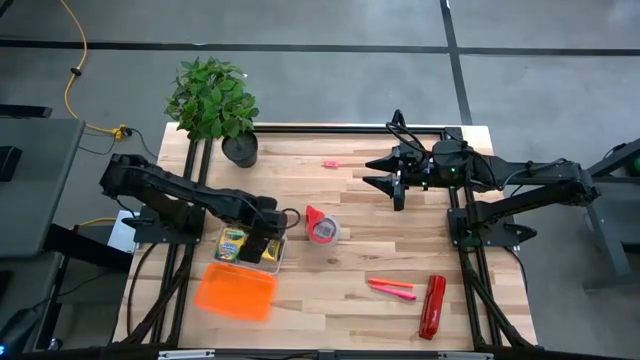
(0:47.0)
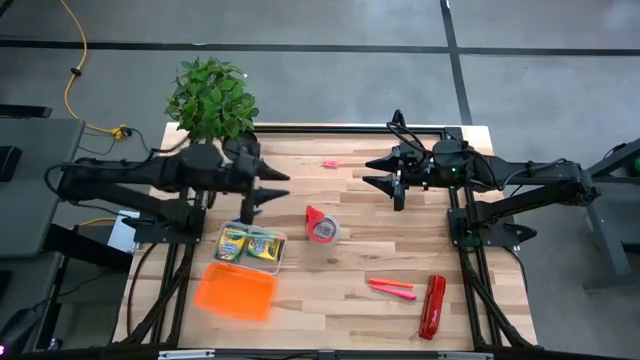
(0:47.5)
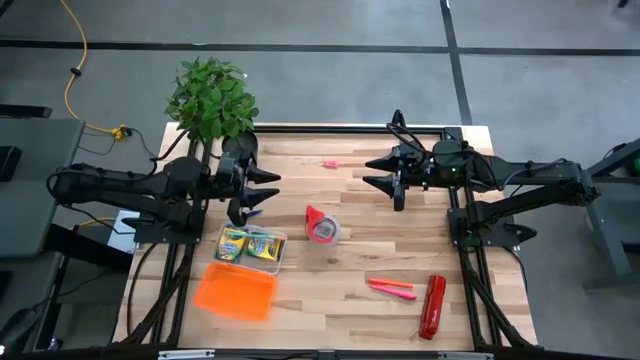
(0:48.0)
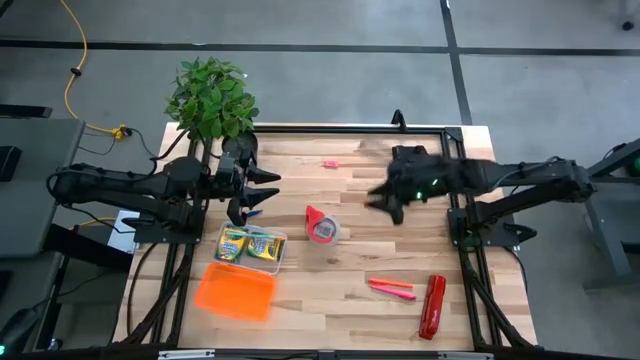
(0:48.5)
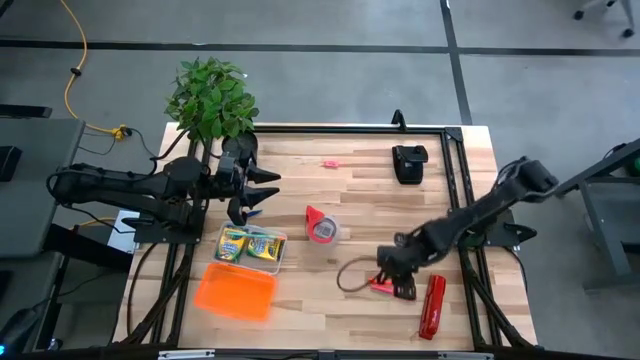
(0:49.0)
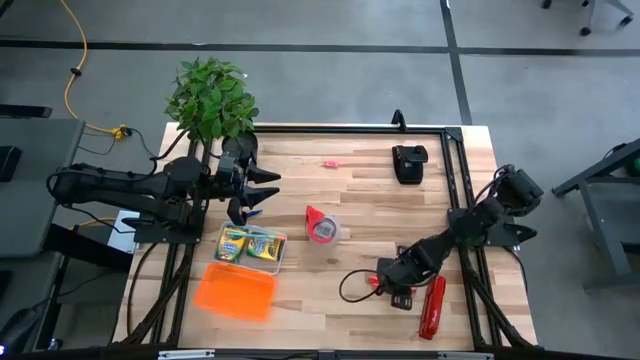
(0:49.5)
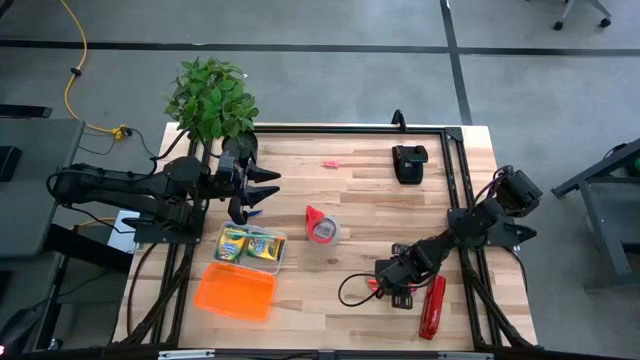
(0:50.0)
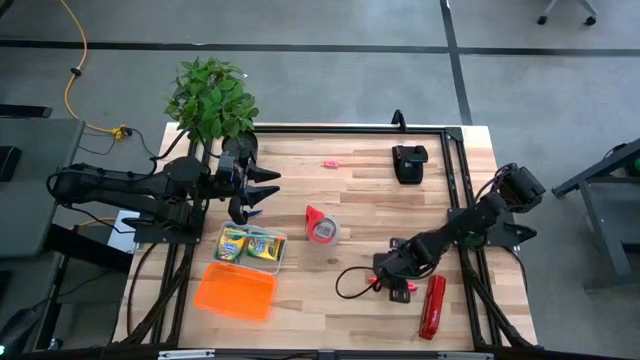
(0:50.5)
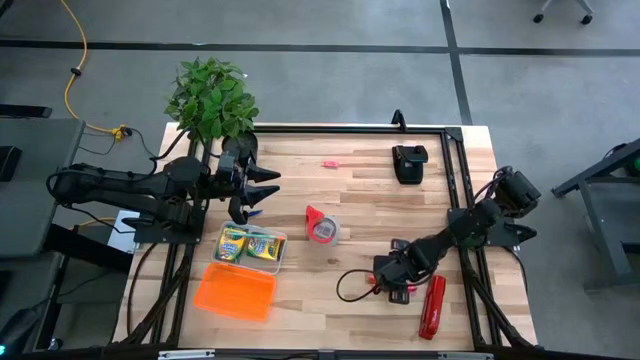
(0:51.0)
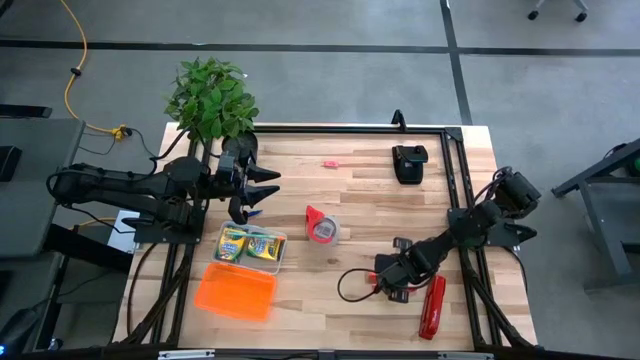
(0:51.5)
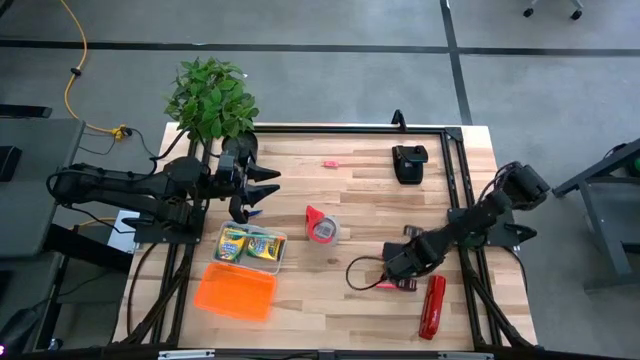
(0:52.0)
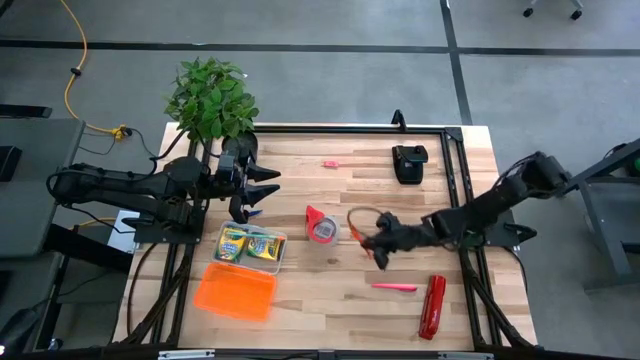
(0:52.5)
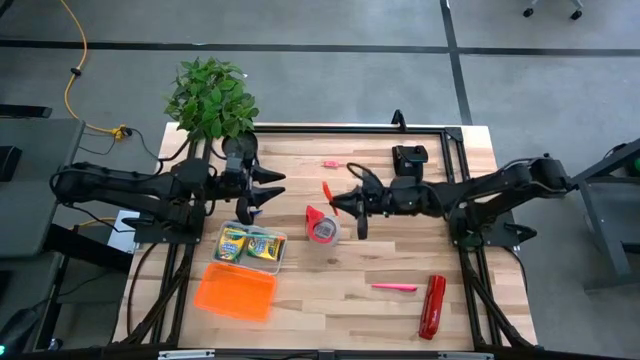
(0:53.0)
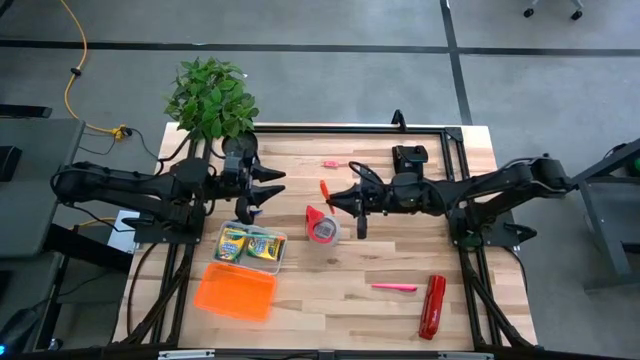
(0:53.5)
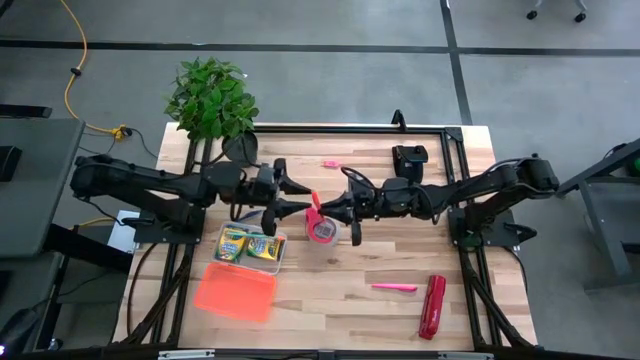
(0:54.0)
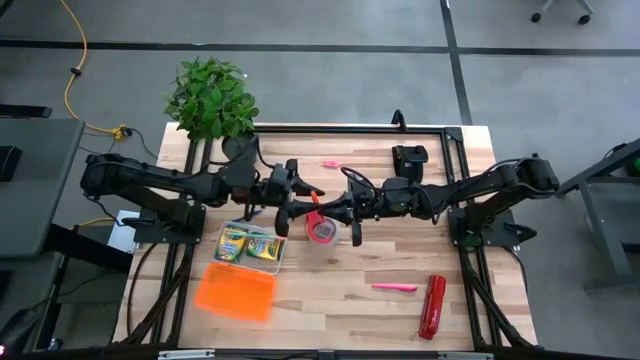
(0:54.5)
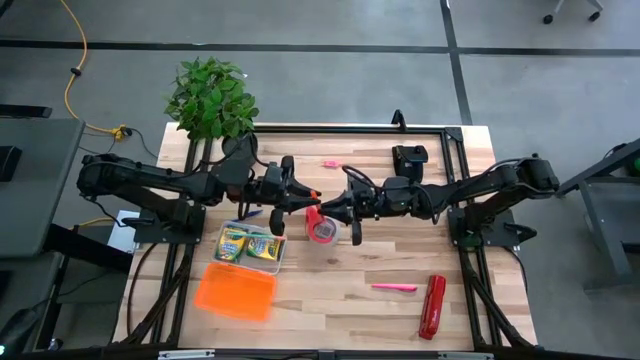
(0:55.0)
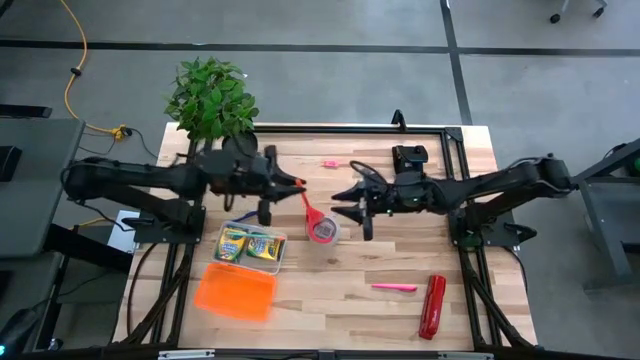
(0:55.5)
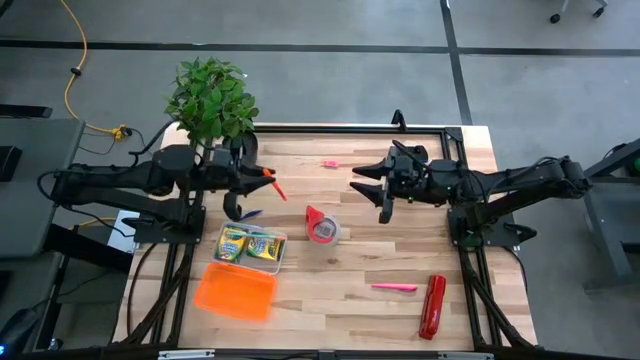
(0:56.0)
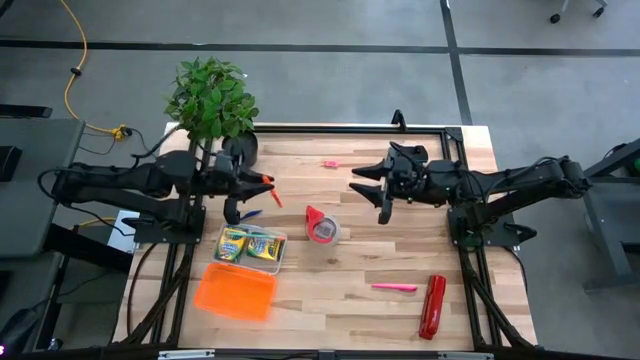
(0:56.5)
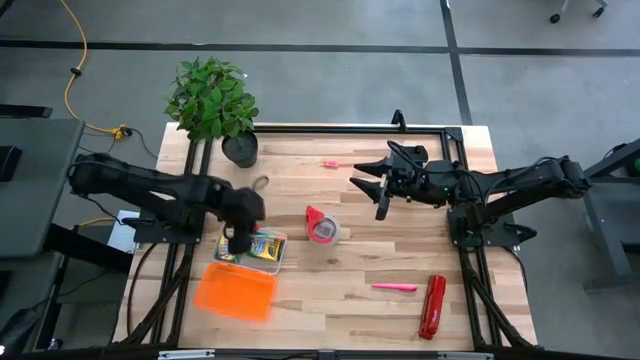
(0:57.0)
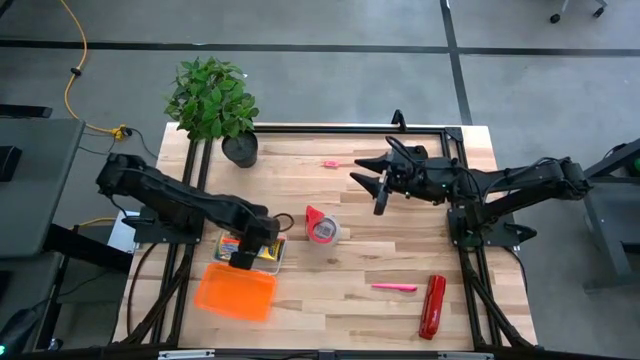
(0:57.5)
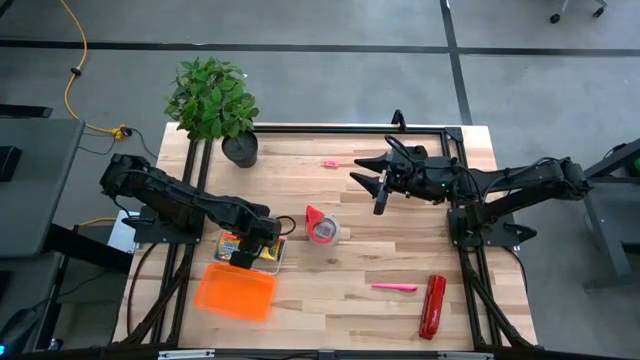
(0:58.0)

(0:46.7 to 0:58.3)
Task: Pack school essentials
Put the orange pen into the orange supply box

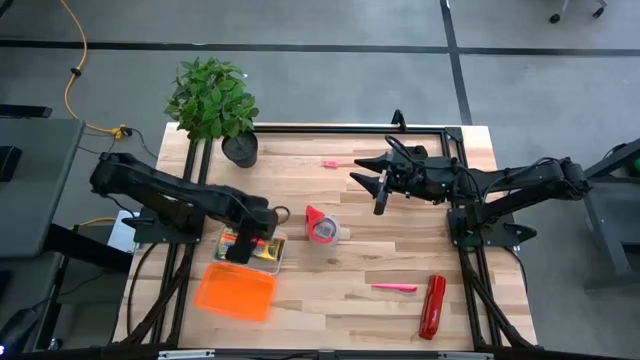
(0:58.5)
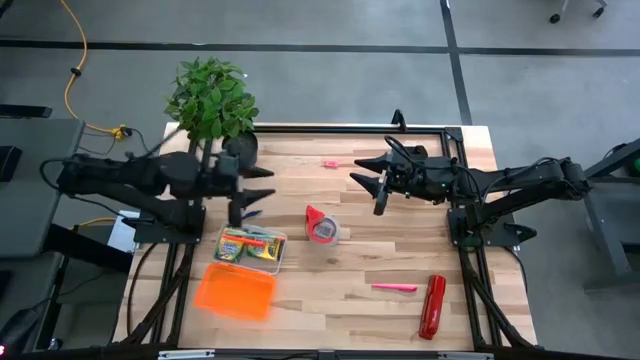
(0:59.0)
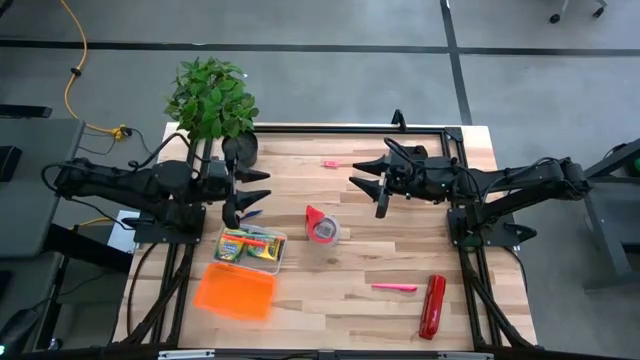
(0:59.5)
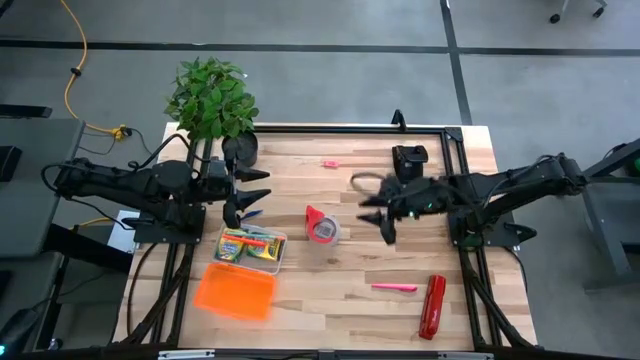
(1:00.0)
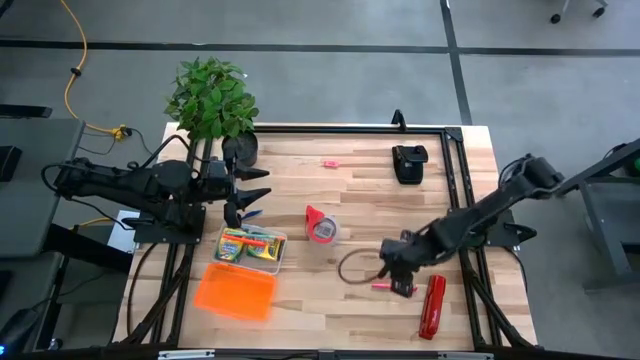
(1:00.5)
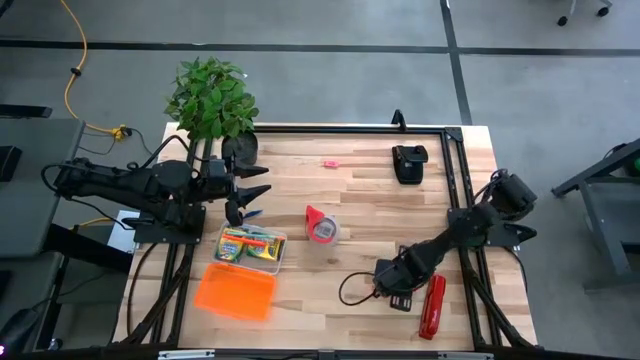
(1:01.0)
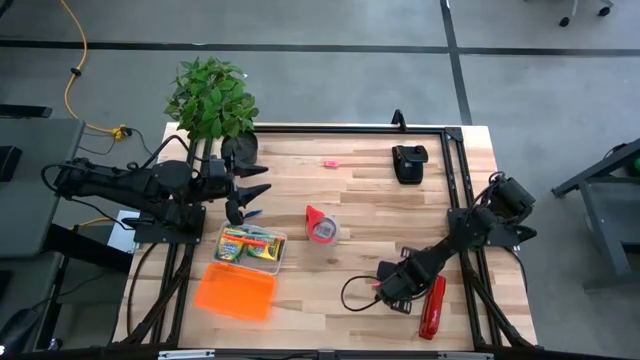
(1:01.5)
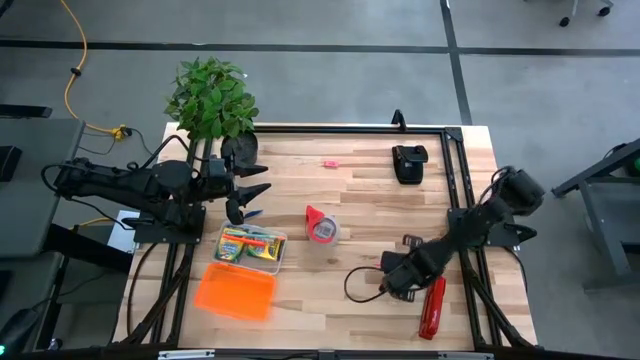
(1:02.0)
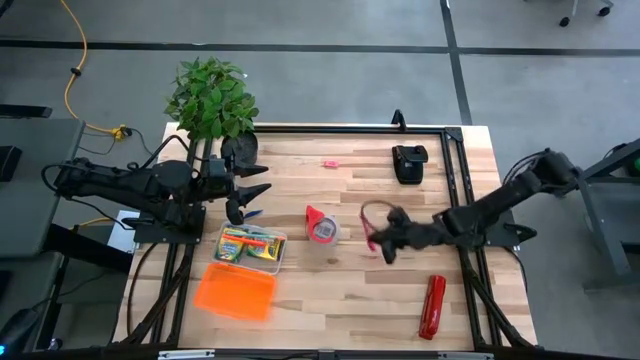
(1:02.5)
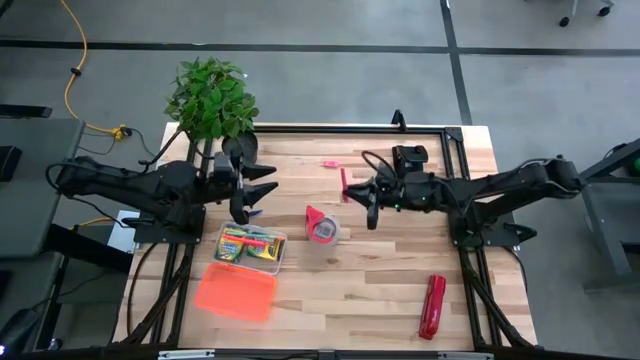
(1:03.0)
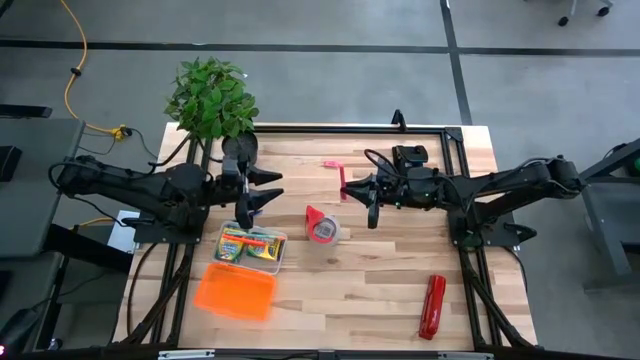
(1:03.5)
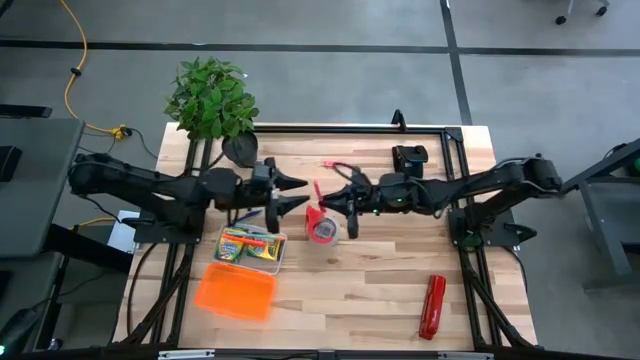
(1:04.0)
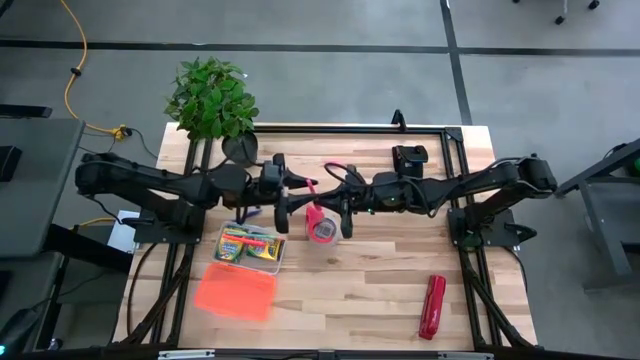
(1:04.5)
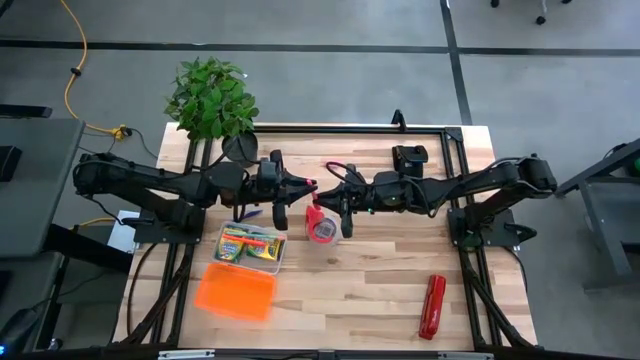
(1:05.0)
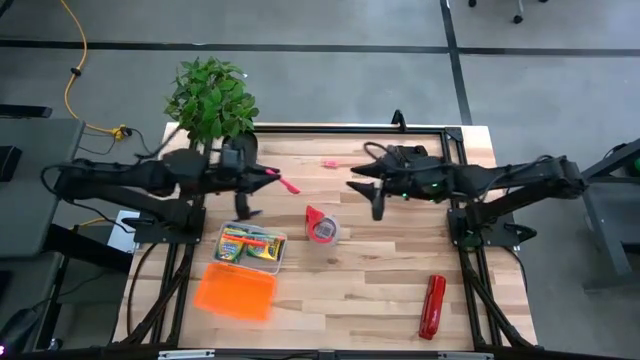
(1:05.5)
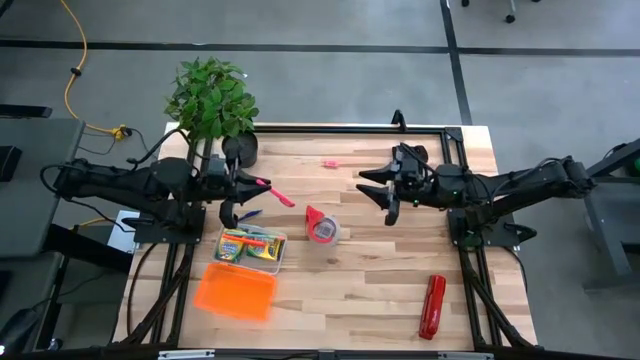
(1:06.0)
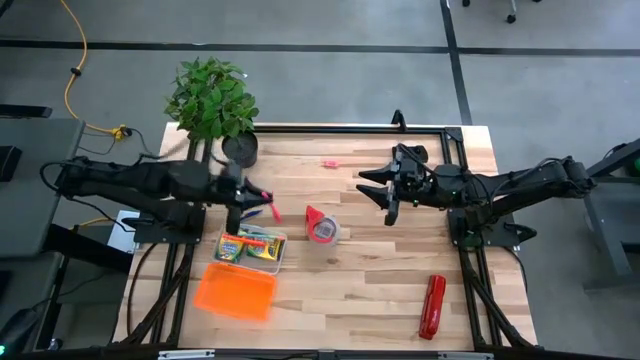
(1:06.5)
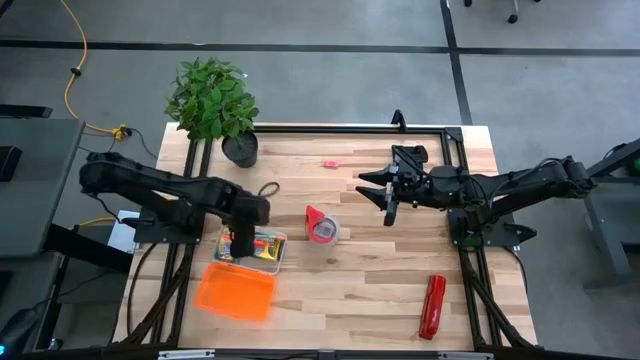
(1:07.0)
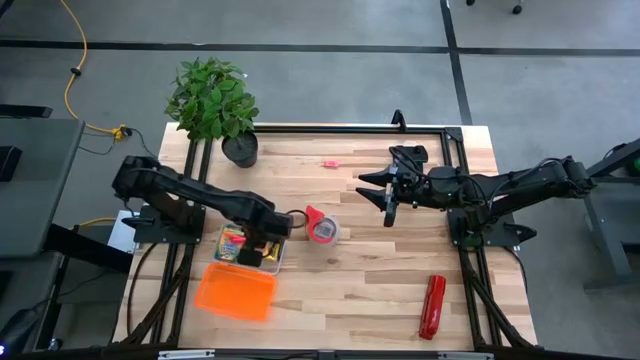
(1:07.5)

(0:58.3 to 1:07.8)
Put the pink pen into the orange supply box

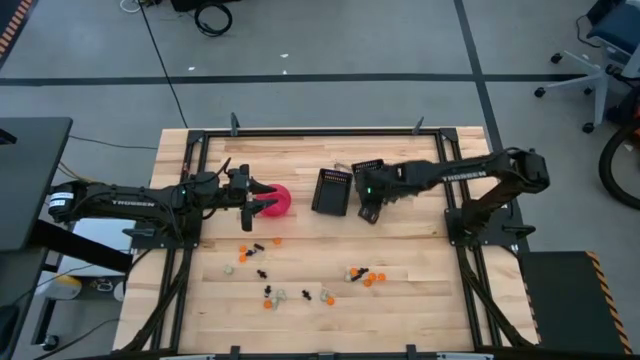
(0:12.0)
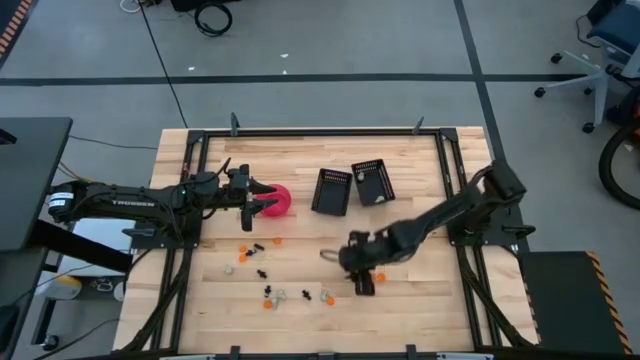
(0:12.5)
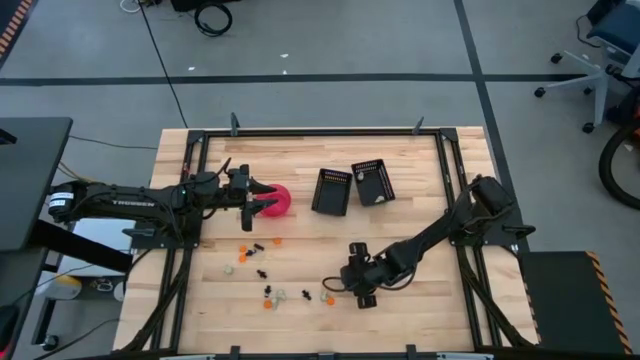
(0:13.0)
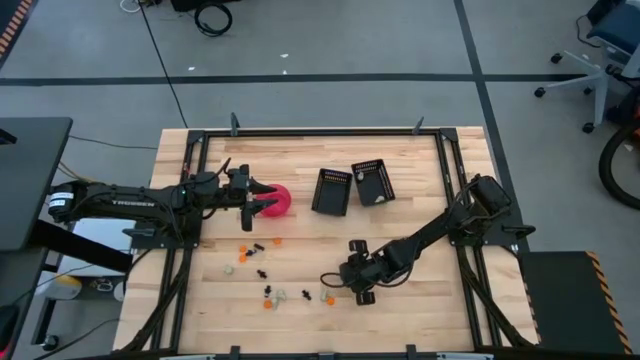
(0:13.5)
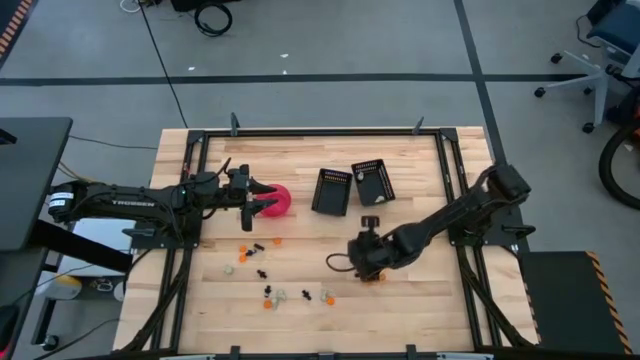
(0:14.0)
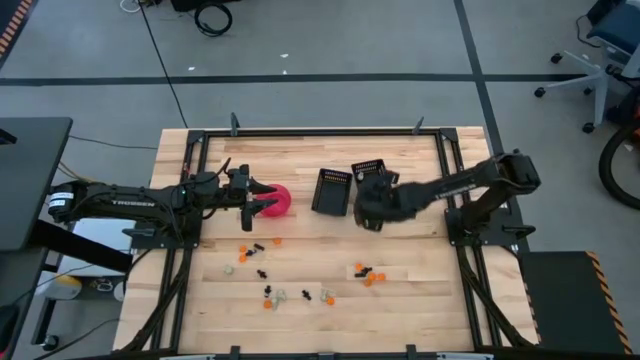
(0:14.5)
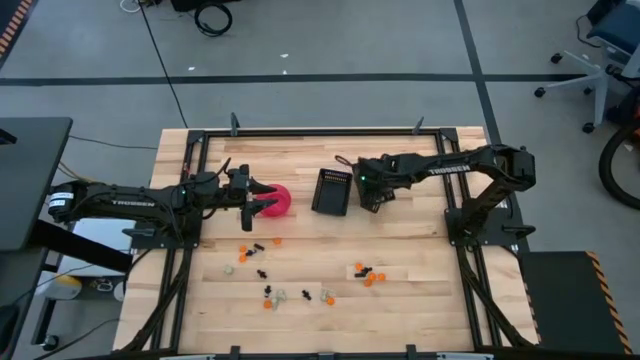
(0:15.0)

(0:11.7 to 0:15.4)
Task: Sort Halloween decoration
Put the white skull toy into the right black bin
